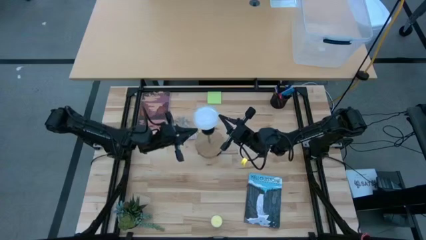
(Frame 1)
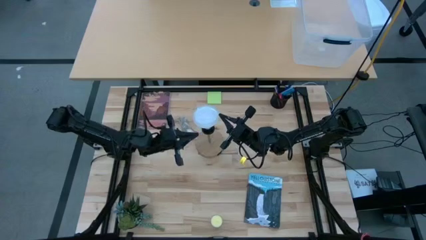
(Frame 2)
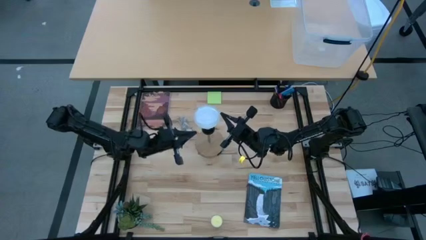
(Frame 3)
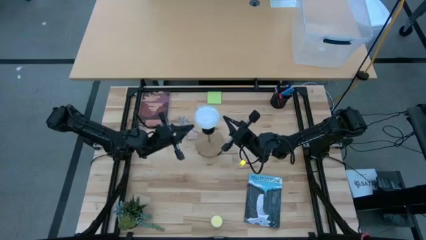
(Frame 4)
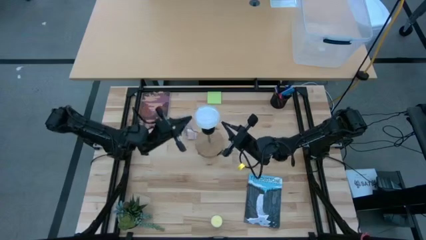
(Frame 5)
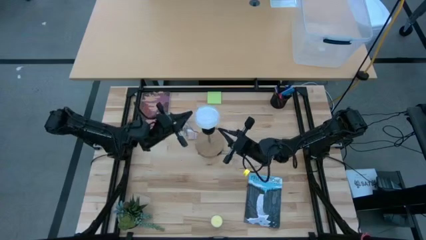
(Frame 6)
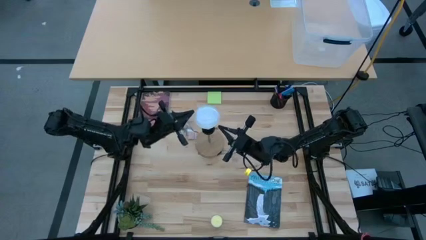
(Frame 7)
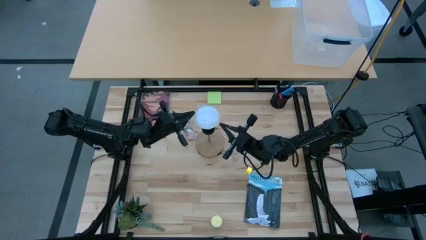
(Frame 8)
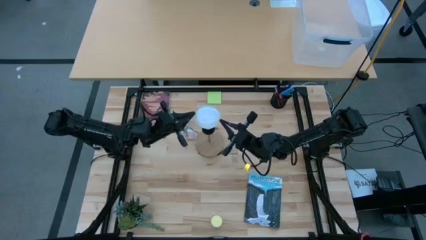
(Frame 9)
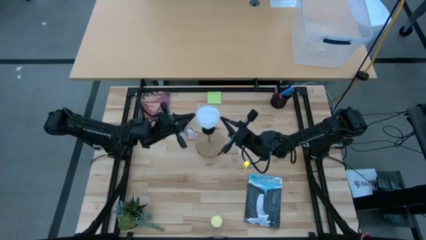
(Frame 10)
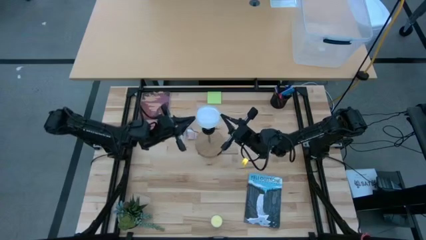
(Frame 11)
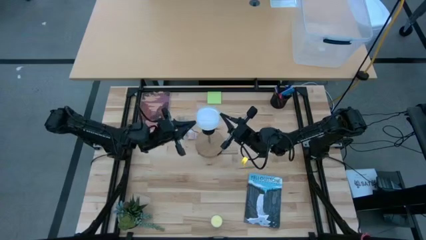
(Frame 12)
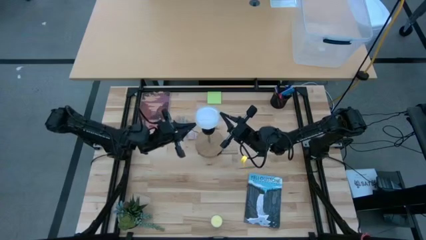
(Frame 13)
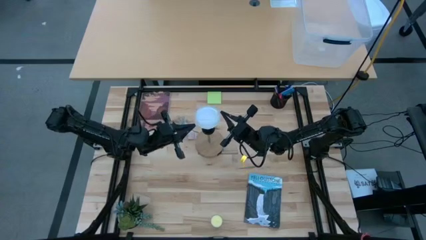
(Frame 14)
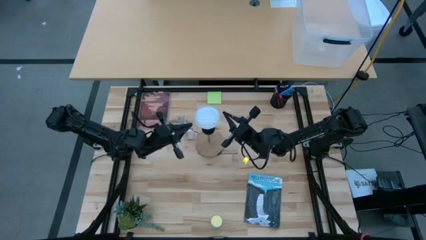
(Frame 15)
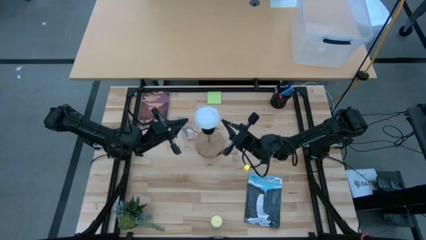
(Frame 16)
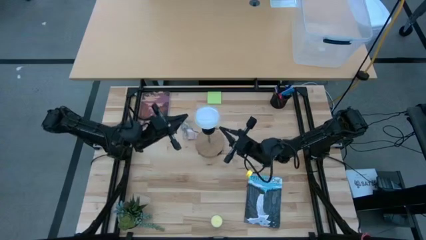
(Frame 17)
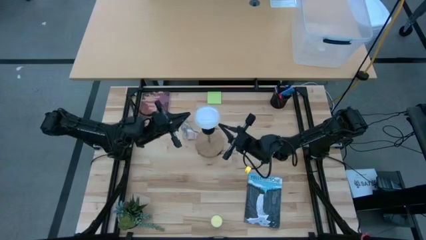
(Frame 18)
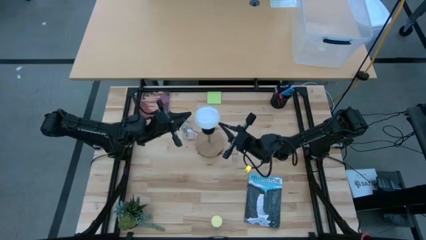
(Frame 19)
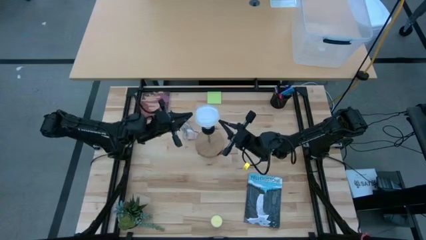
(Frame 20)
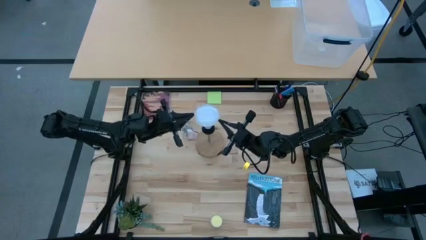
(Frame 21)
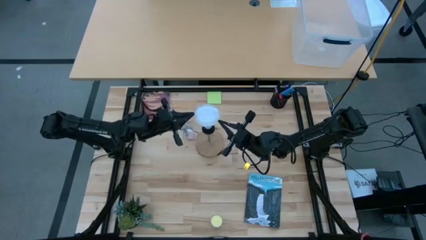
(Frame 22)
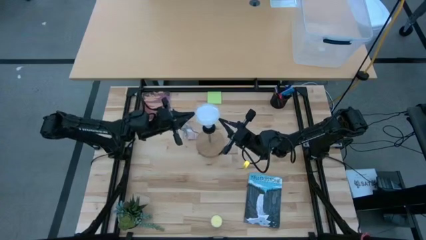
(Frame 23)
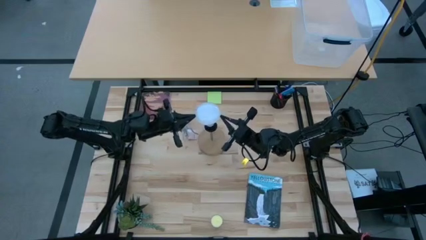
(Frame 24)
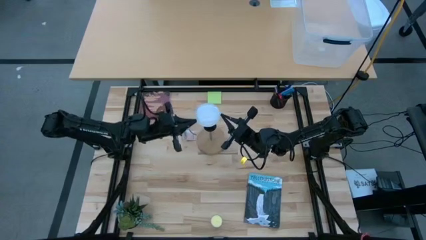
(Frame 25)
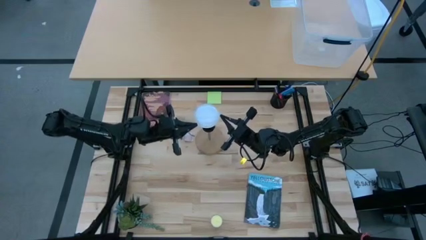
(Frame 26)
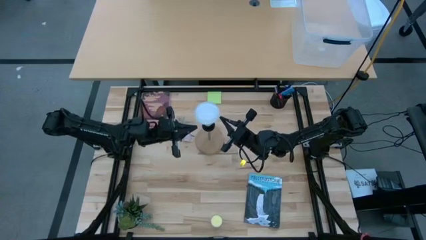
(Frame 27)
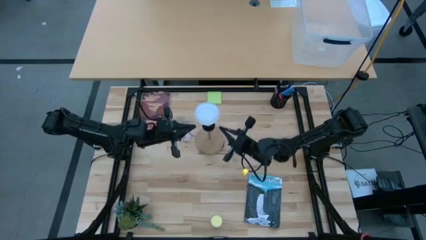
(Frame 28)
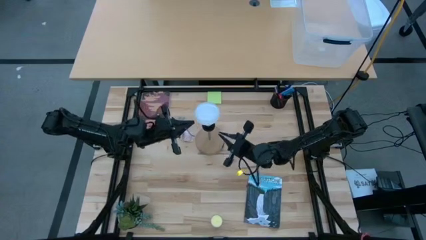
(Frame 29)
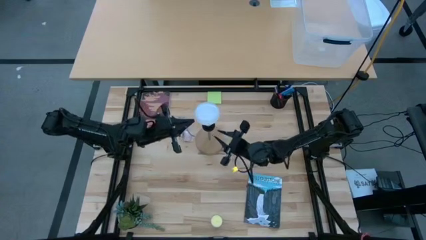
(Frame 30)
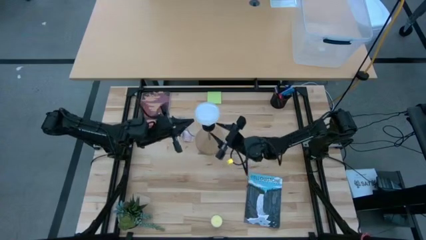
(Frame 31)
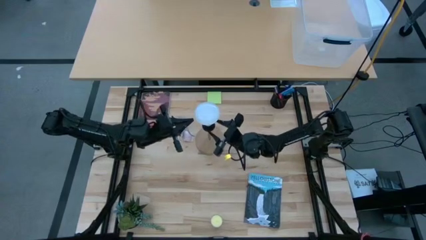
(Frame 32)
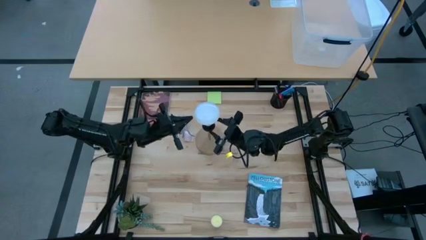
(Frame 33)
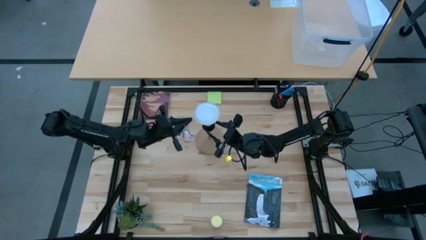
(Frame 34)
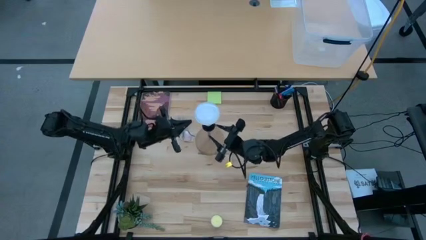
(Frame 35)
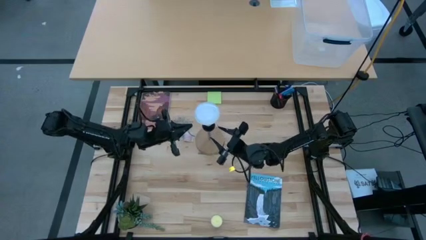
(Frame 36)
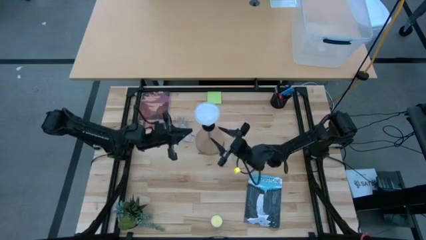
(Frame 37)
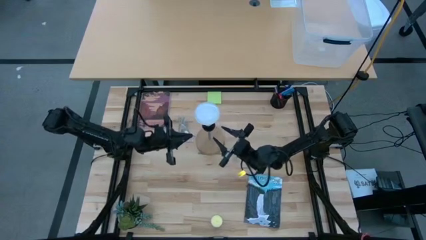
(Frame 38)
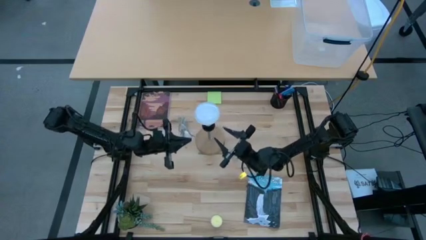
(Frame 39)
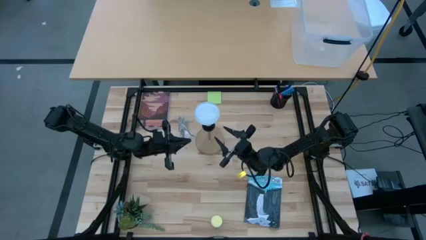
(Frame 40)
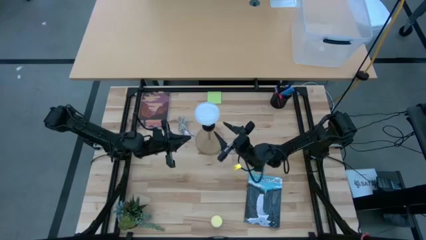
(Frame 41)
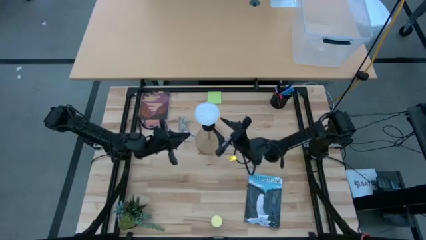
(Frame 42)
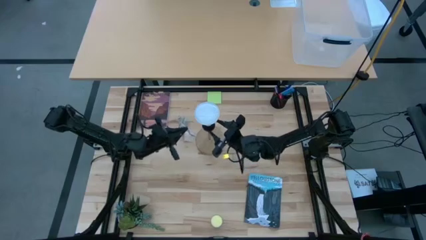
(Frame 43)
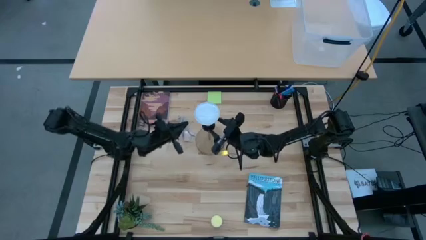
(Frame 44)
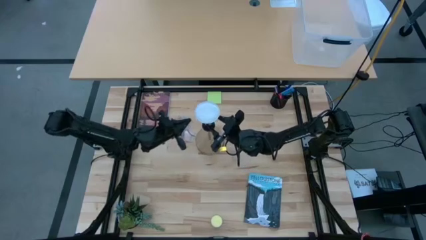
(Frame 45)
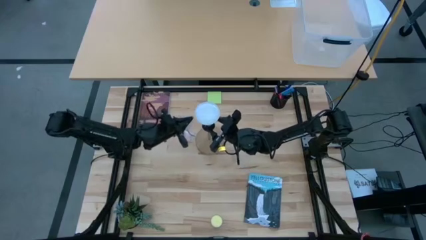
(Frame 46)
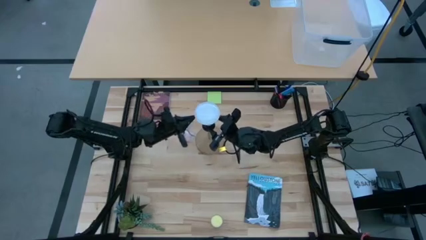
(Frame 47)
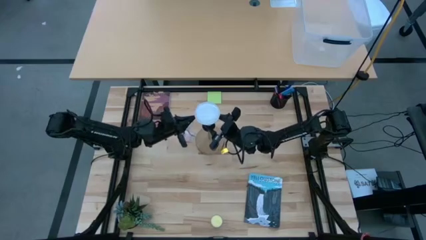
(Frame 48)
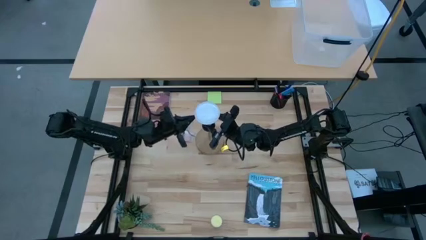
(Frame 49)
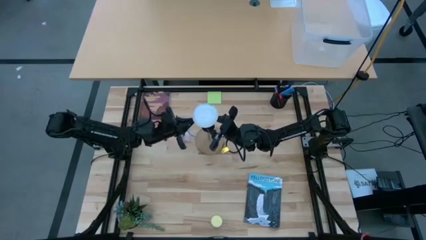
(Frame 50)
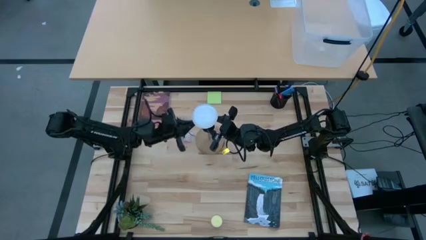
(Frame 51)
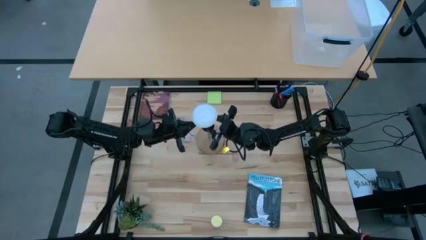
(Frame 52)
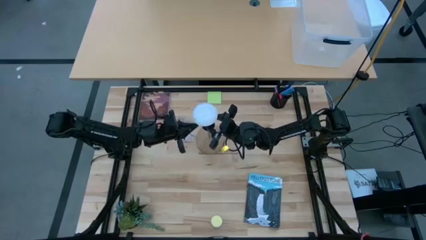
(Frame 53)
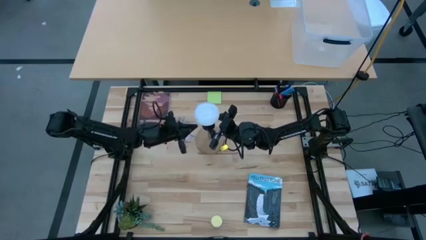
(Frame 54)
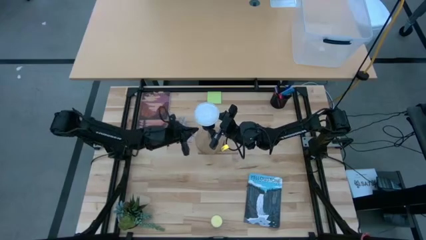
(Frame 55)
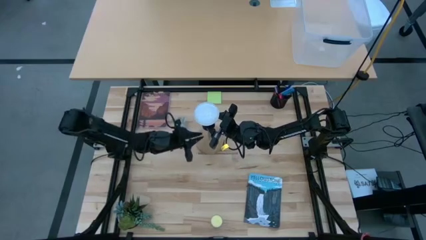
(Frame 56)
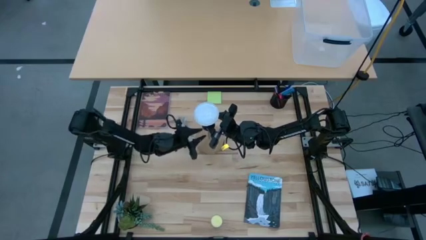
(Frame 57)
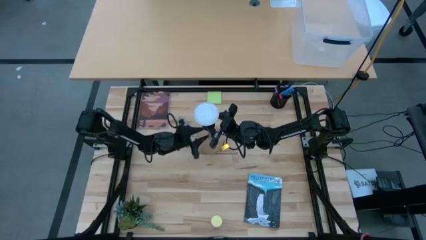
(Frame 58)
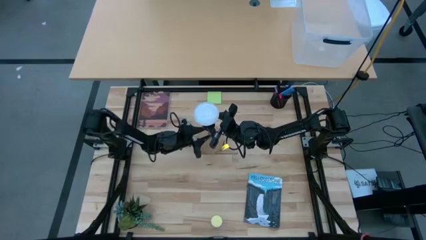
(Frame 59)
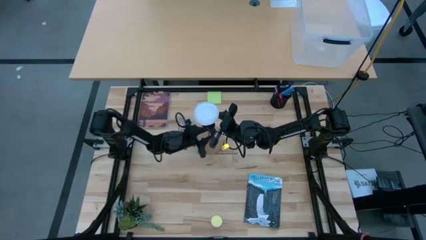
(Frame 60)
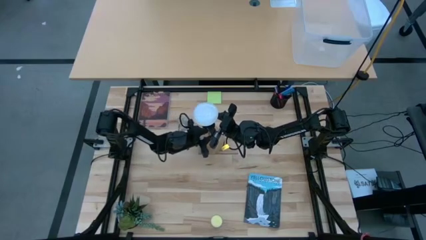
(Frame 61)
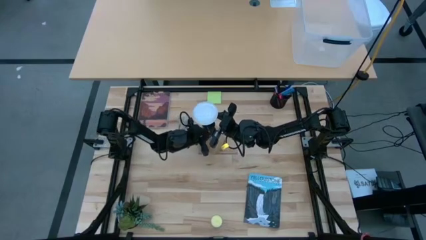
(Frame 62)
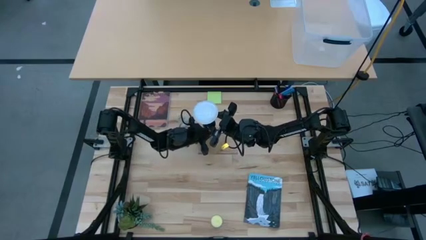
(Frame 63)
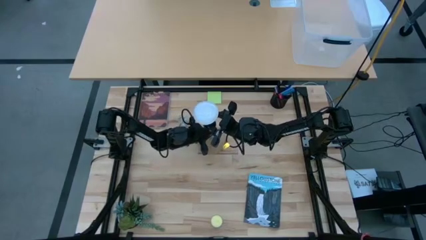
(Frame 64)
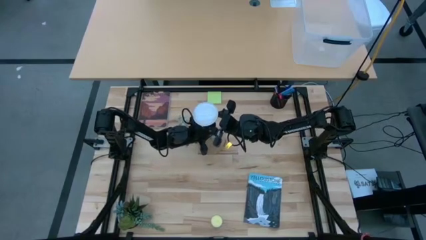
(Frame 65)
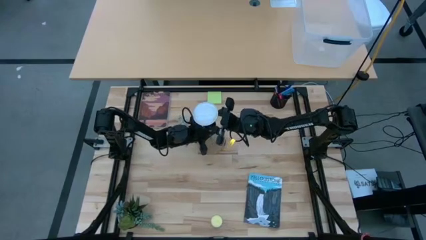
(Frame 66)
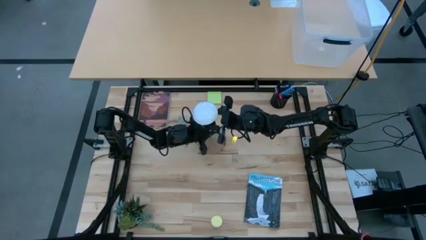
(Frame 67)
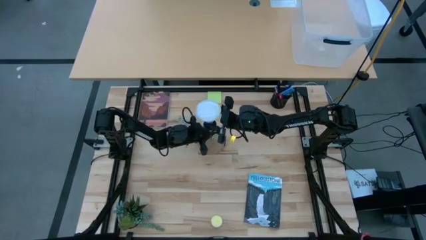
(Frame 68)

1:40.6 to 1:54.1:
Task: Screw lightbulb
Remove the lightbulb from the lamp

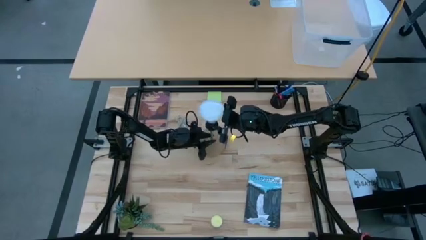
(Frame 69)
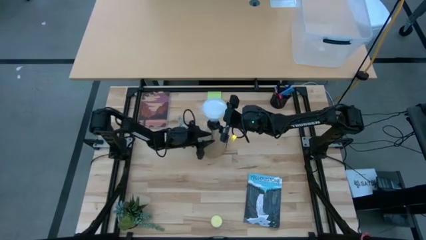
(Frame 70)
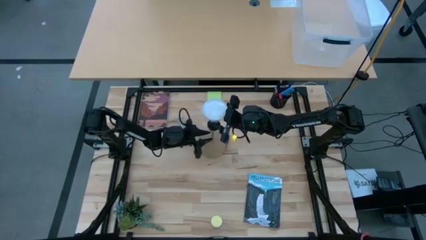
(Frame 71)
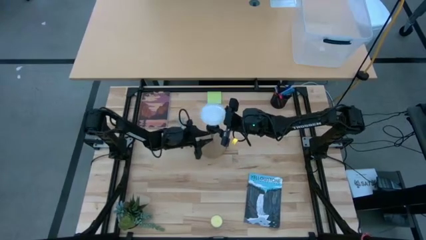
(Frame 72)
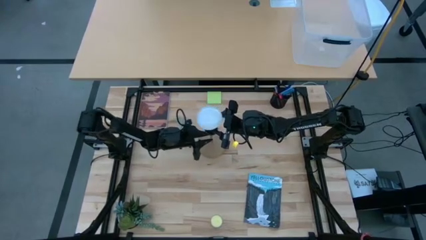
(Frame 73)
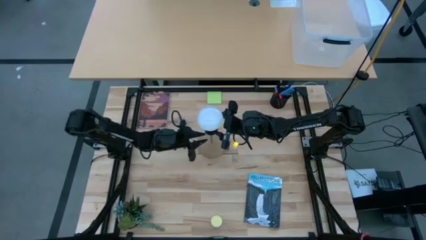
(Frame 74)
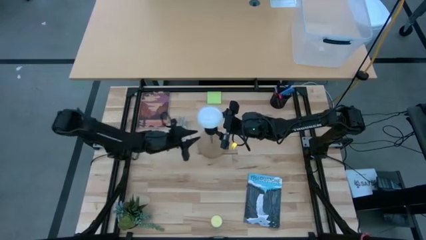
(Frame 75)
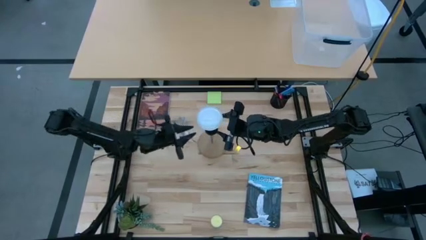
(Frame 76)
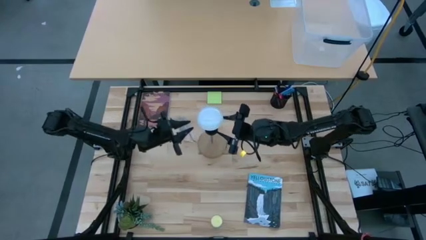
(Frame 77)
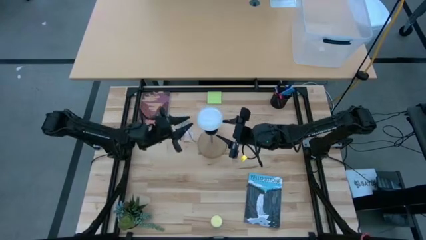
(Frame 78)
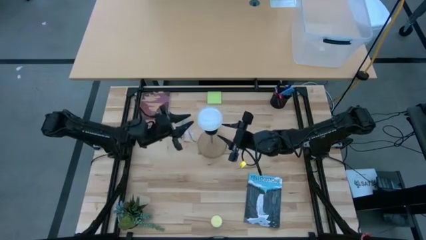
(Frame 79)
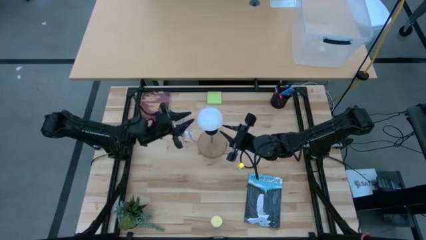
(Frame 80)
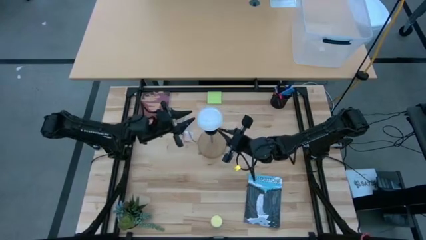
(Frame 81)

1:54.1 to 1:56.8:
Remove the lightbulb from the lamp
